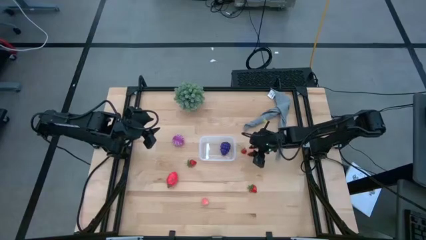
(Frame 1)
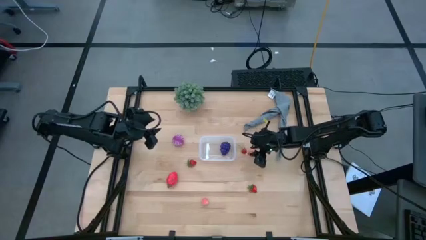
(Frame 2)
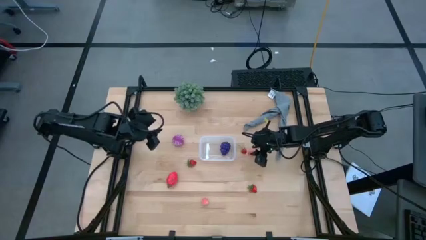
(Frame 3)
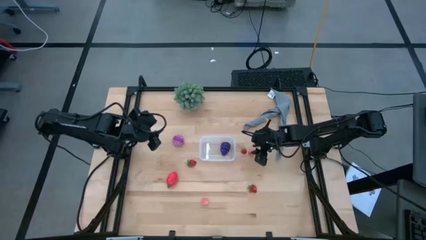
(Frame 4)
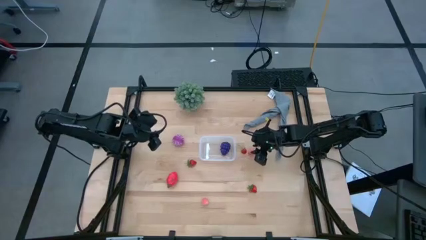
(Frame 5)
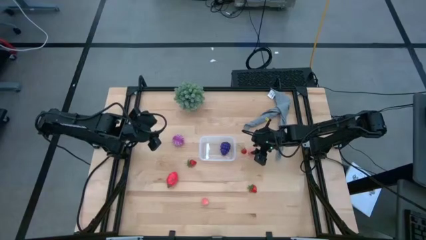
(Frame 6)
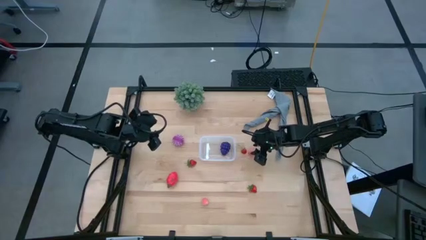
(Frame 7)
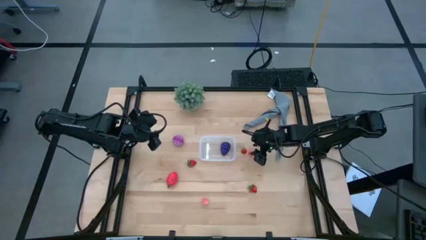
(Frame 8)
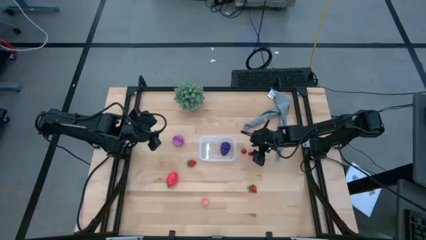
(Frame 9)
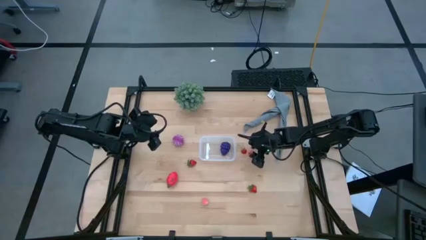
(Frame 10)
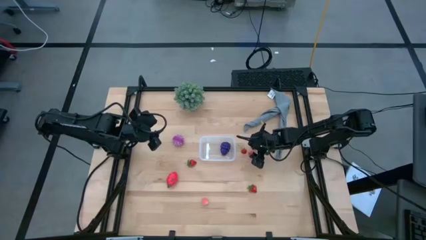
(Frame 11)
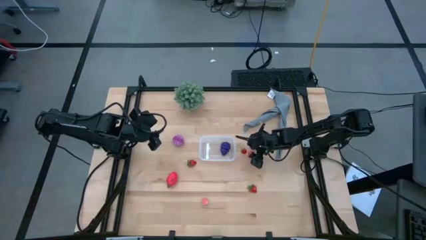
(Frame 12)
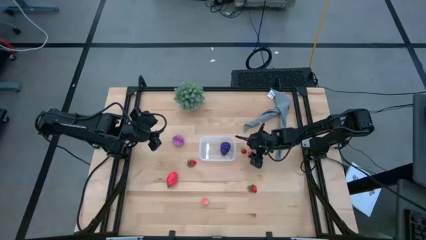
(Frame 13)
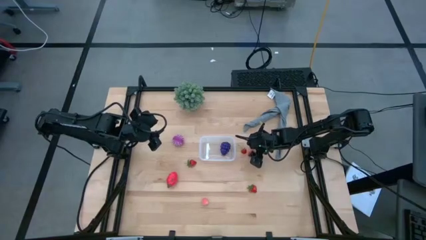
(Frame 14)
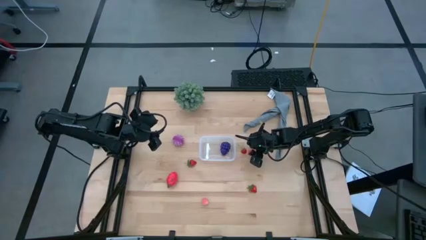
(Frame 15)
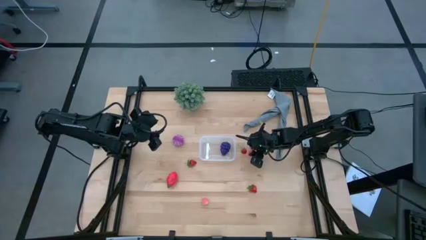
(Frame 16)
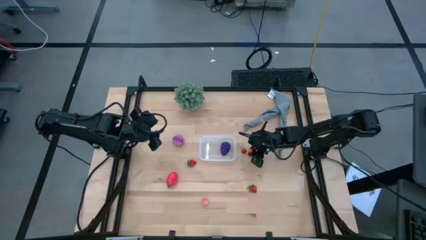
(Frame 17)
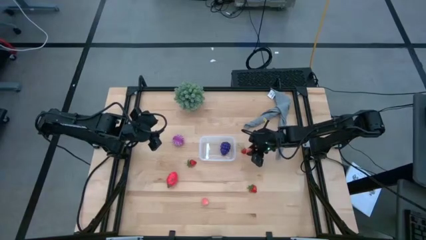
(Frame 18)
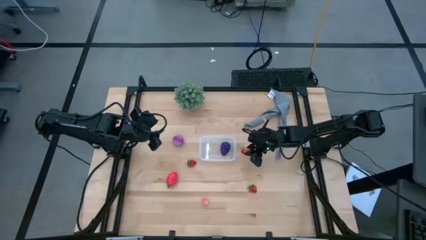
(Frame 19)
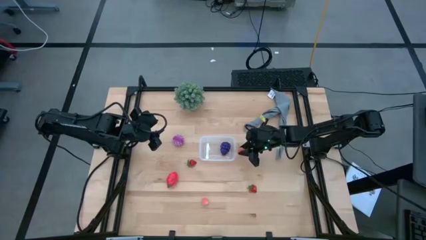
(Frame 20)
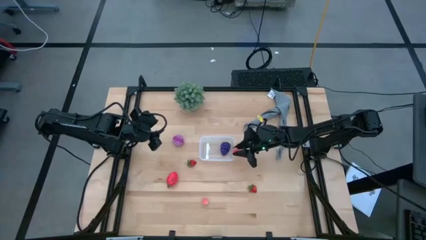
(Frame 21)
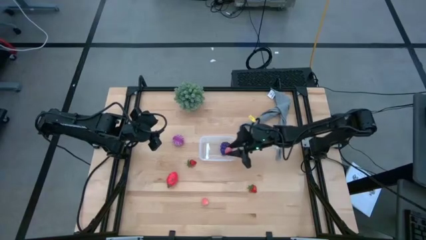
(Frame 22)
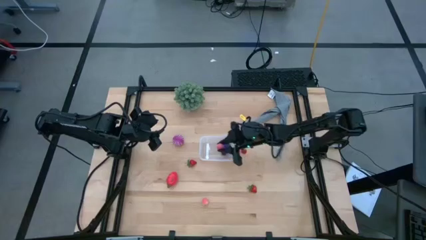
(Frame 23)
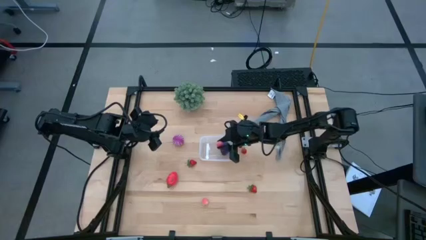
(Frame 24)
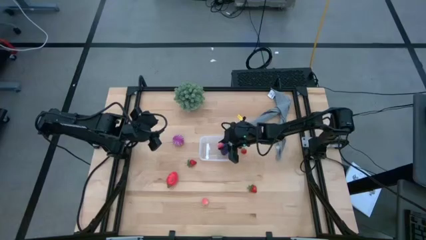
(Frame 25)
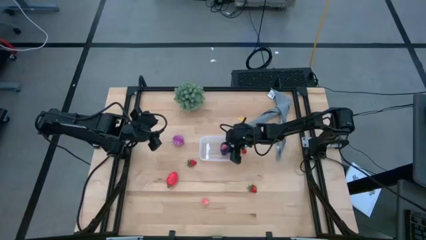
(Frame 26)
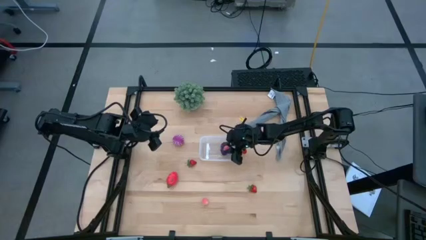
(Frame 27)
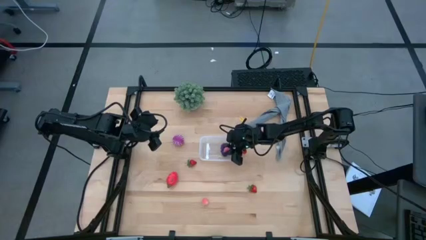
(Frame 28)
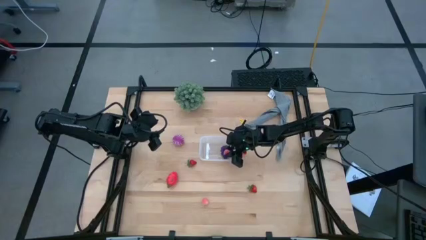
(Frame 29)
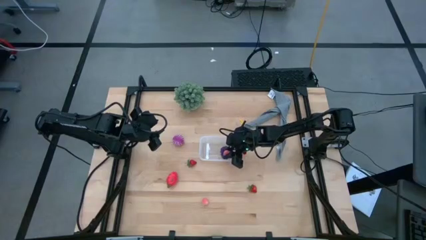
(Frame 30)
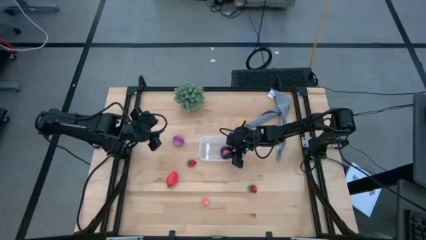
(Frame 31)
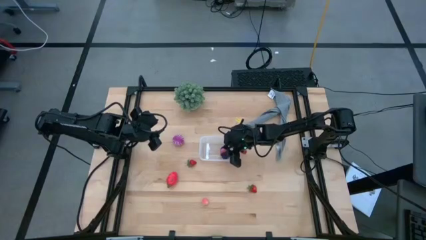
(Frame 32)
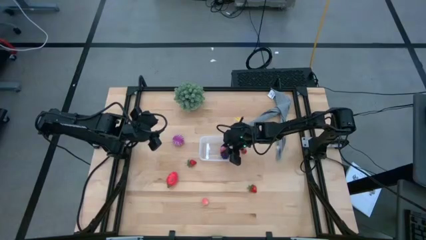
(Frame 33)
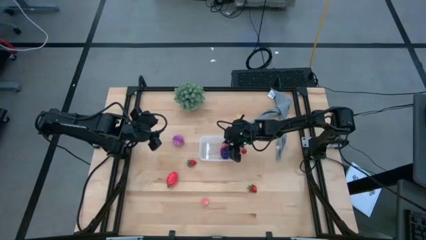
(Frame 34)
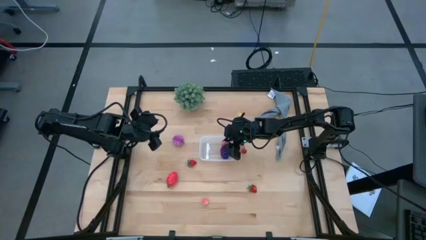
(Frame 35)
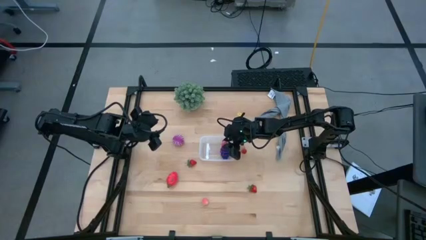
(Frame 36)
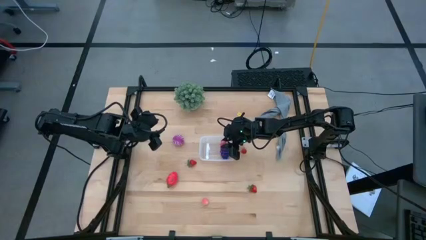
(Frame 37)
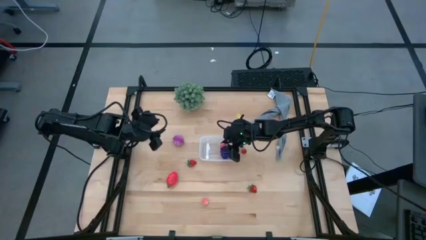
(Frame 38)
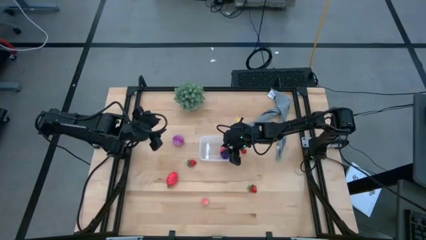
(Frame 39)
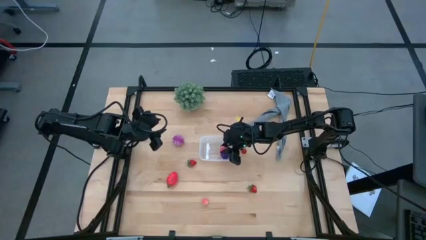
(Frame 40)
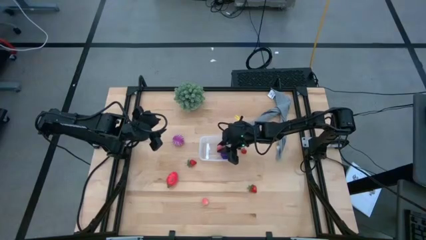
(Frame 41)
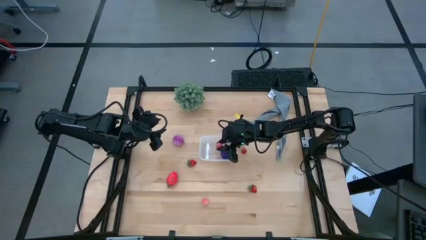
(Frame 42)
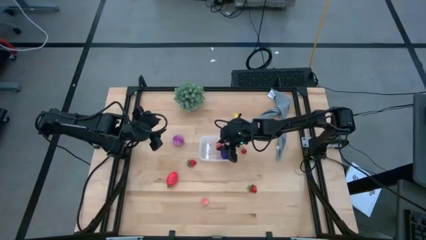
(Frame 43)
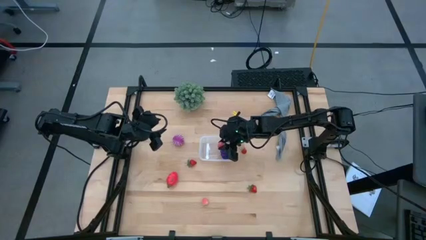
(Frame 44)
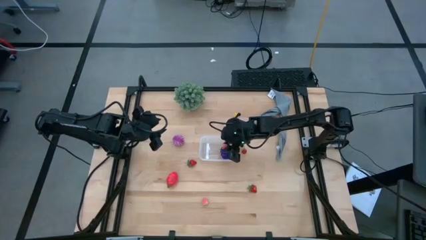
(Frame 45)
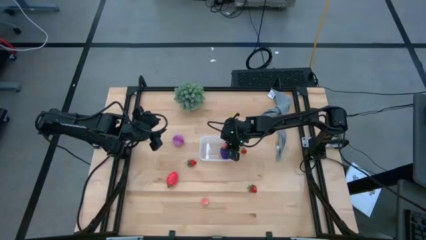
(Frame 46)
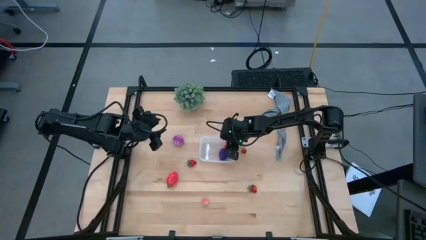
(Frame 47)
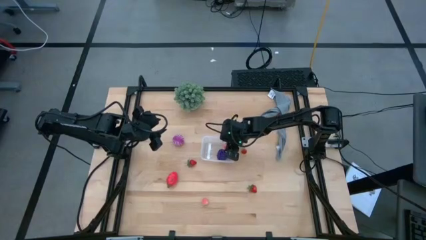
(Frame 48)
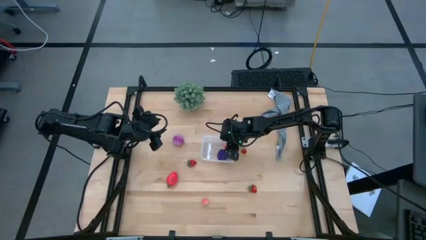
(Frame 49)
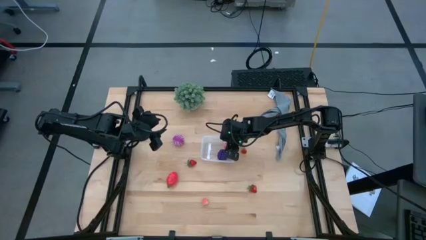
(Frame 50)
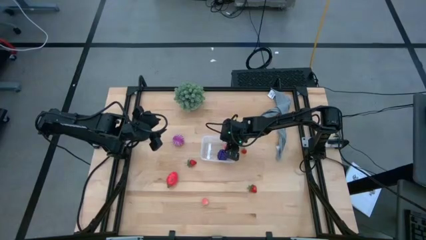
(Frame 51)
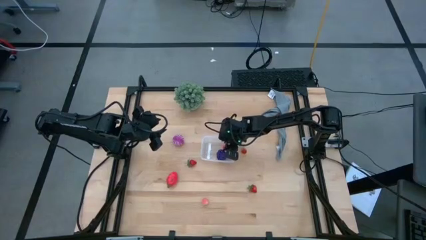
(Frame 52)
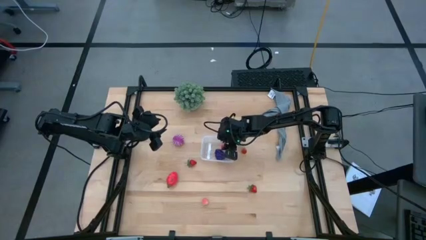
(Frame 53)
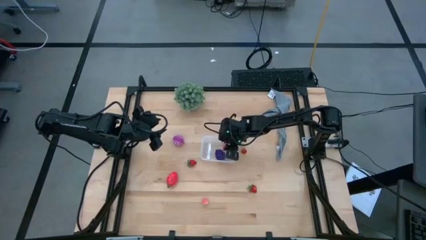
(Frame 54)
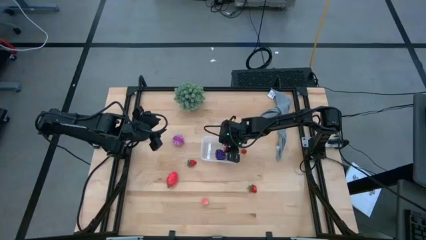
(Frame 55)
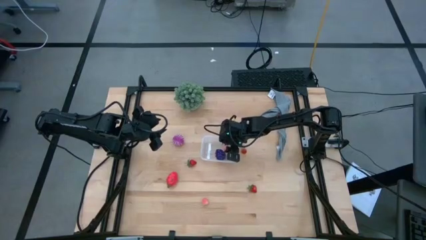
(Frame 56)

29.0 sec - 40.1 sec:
Task: Pick and placing Produce into tupperware
Put the top peach into the transparent container

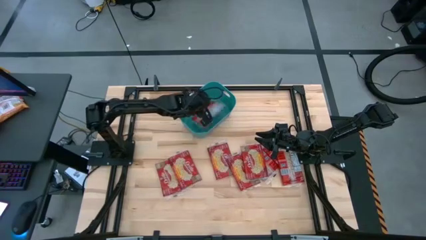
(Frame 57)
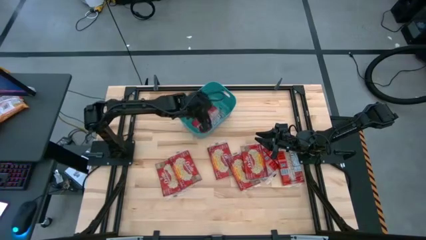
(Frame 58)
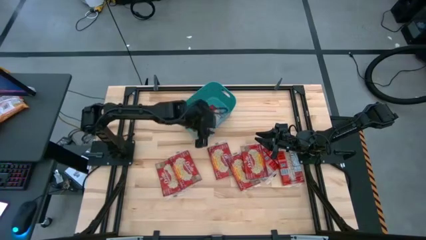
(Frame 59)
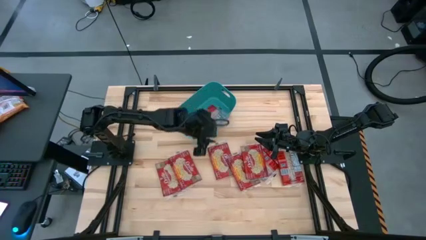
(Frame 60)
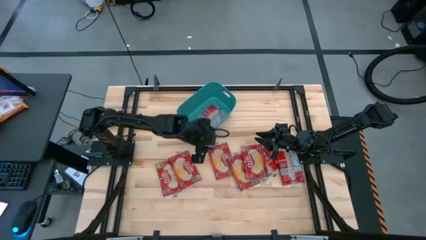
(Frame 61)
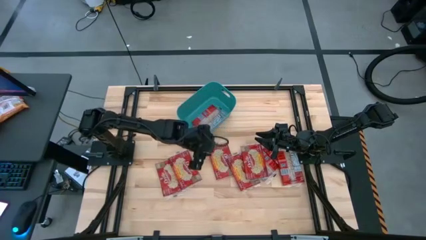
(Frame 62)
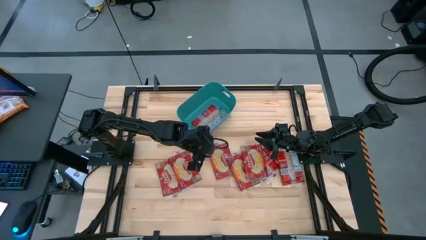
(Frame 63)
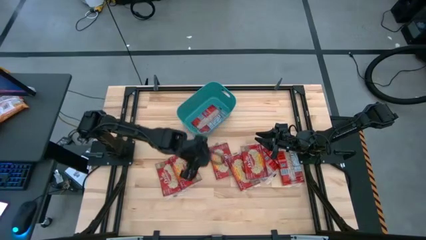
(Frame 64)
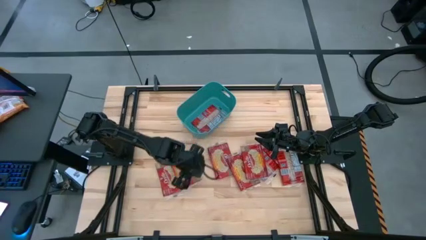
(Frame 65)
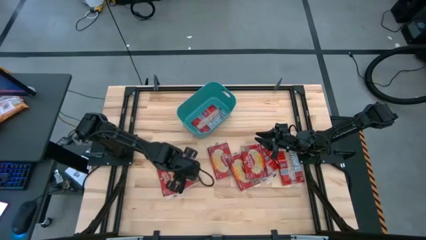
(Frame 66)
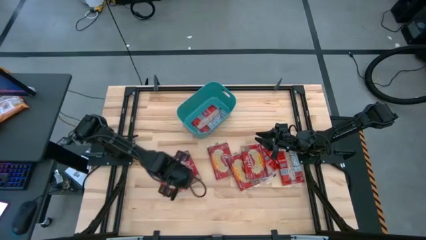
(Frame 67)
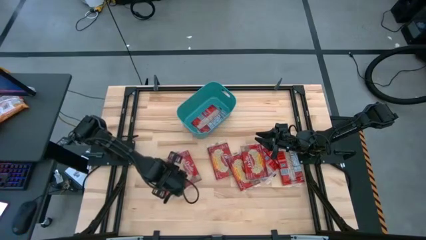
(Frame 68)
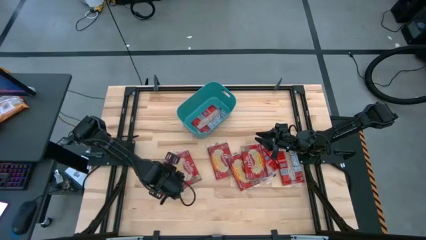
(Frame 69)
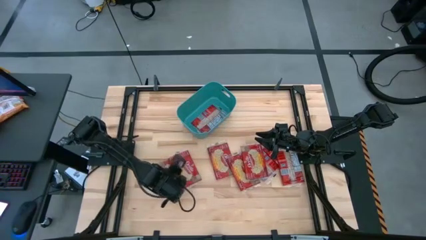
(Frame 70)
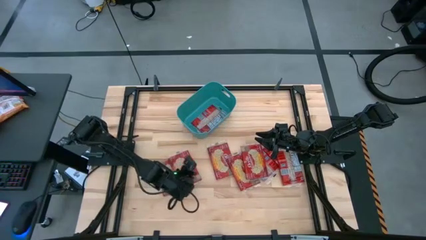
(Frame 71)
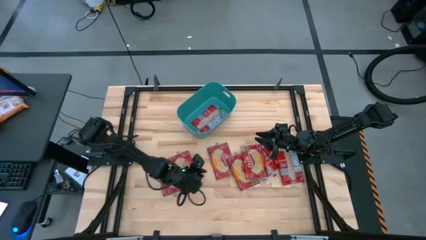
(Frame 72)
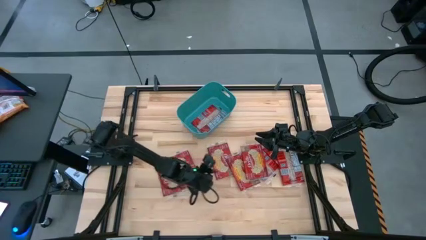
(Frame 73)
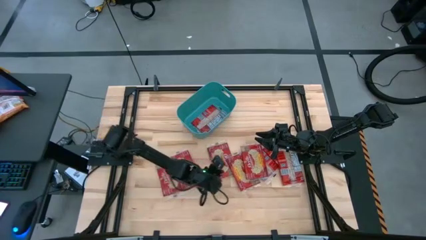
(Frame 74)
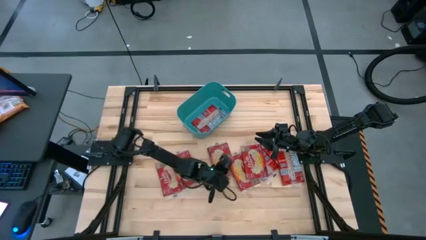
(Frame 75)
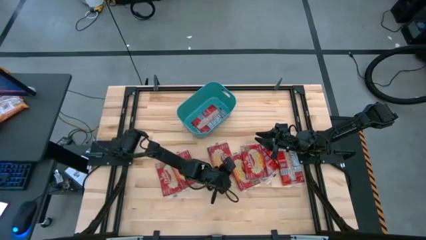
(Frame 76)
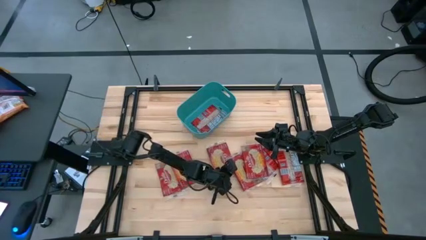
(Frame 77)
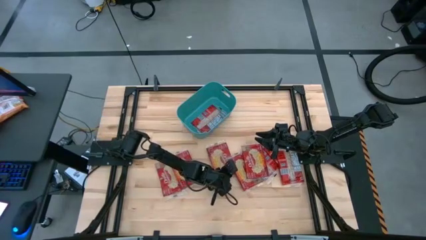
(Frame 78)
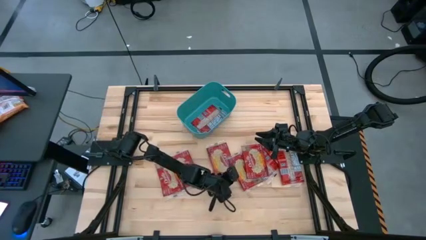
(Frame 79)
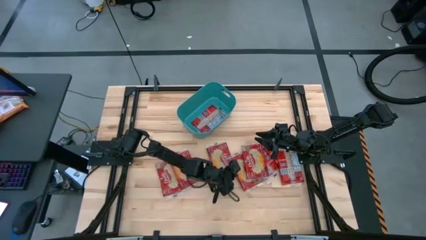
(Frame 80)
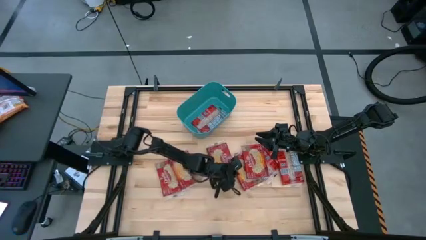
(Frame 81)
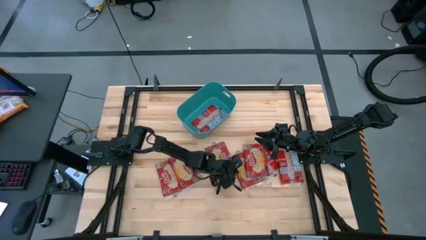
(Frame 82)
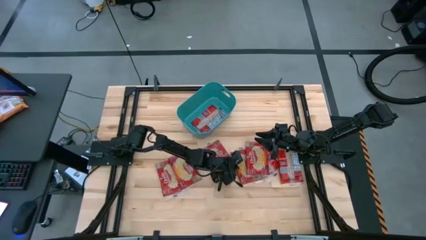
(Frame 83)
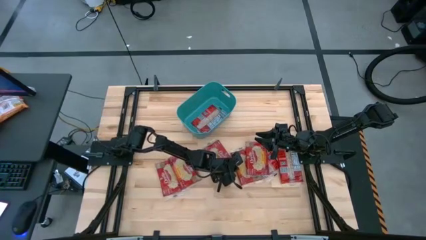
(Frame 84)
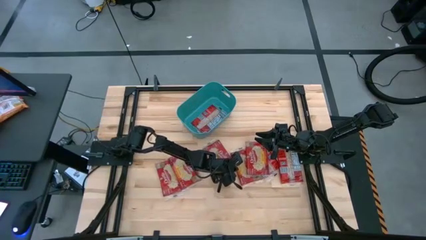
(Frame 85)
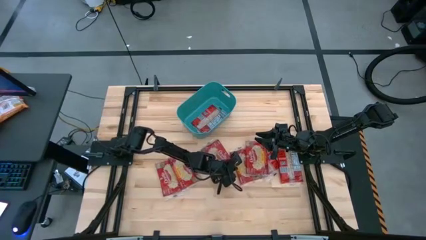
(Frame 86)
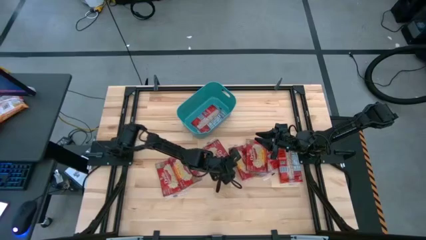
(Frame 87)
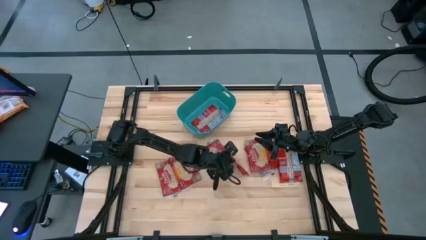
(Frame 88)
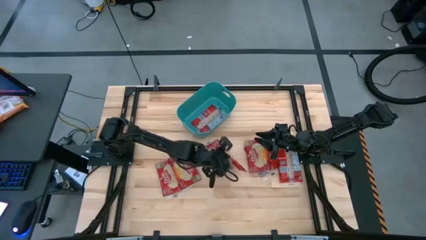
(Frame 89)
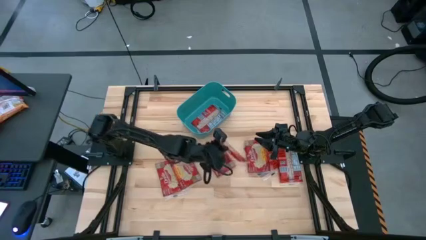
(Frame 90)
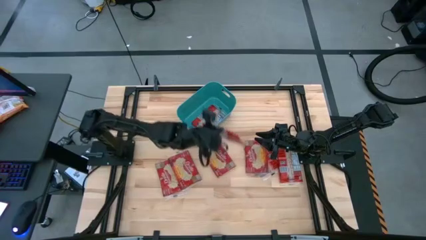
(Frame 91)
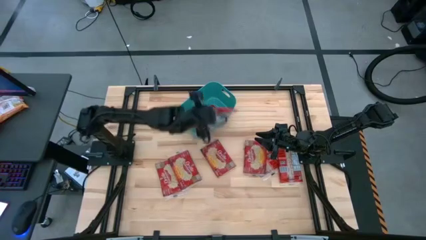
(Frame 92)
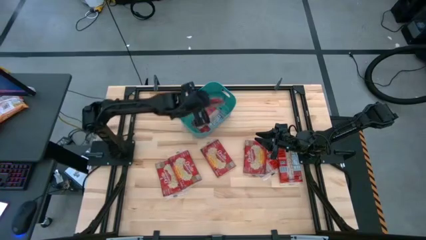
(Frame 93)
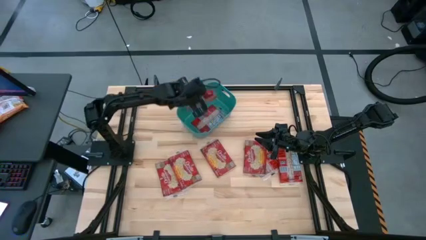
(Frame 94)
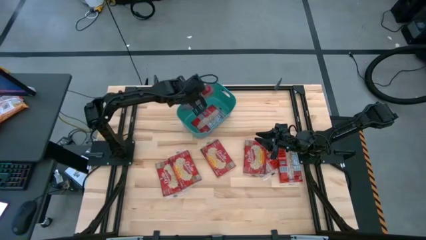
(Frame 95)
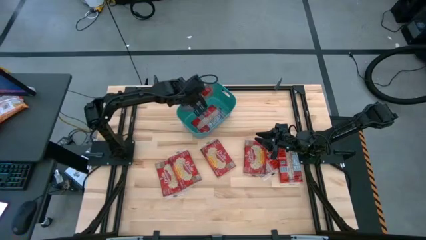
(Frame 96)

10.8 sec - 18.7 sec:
Task: Sort popcorn bags into baskets
Put the red popcorn bag into the green container
